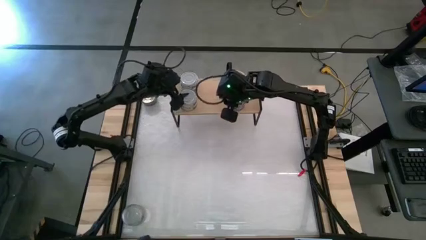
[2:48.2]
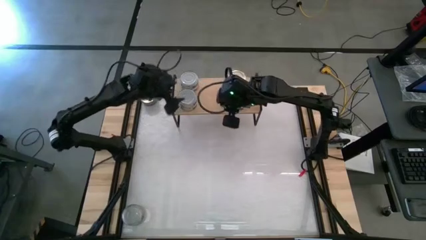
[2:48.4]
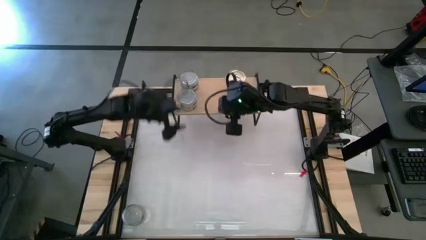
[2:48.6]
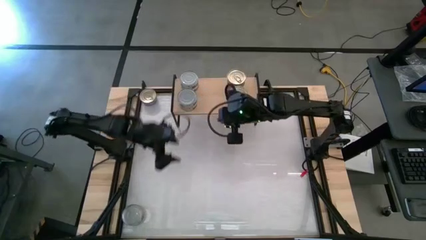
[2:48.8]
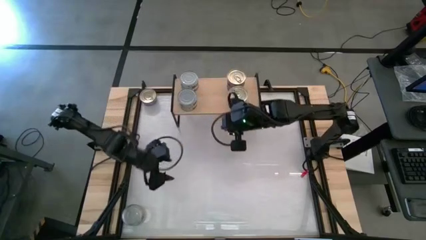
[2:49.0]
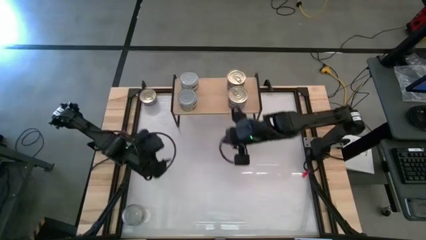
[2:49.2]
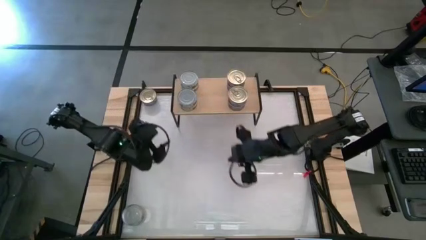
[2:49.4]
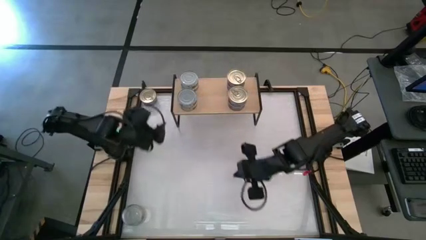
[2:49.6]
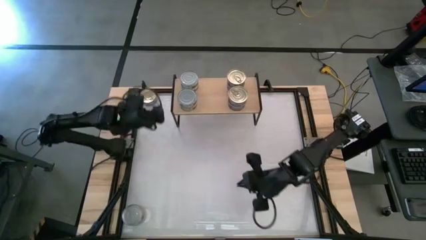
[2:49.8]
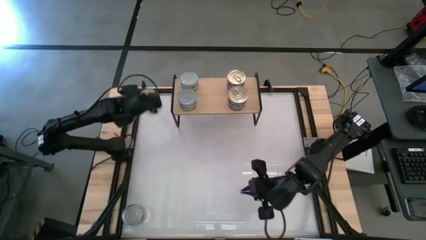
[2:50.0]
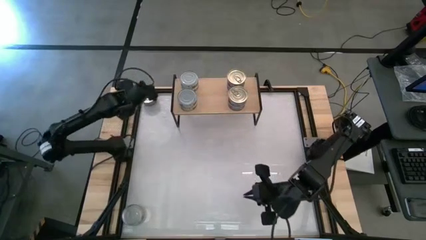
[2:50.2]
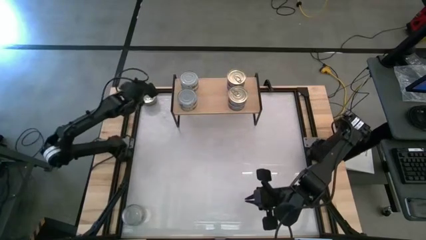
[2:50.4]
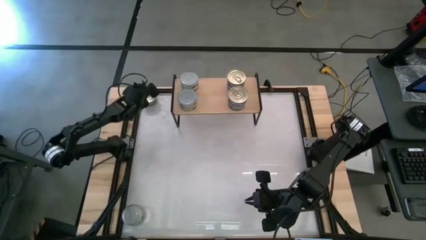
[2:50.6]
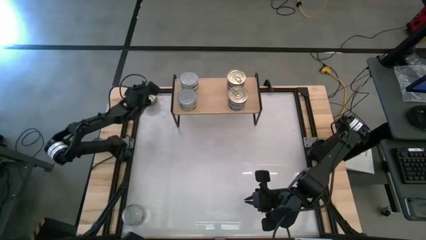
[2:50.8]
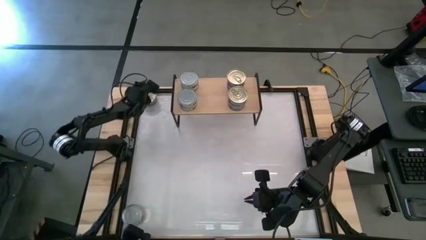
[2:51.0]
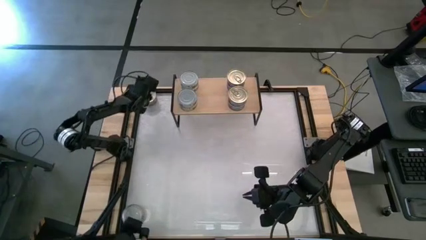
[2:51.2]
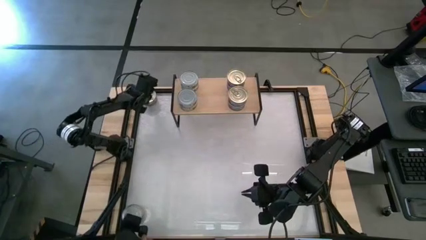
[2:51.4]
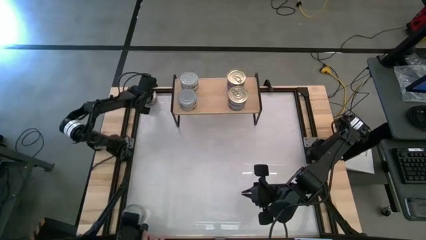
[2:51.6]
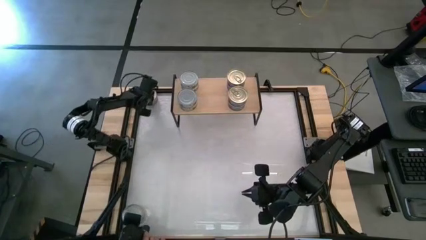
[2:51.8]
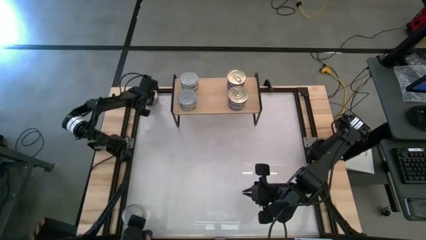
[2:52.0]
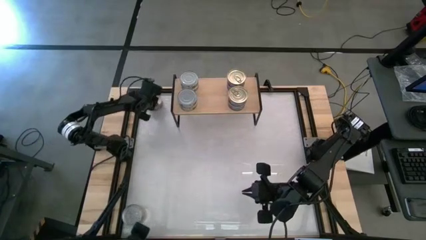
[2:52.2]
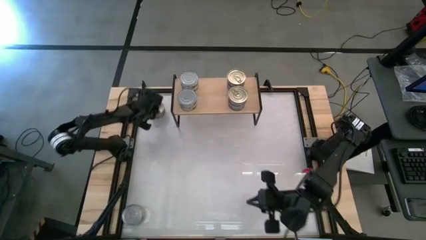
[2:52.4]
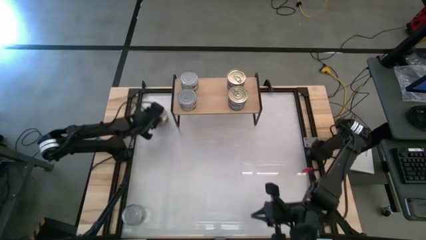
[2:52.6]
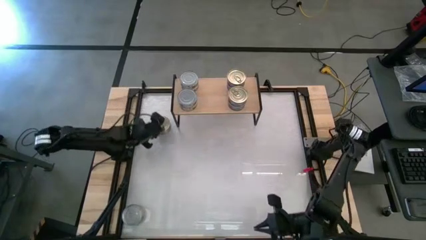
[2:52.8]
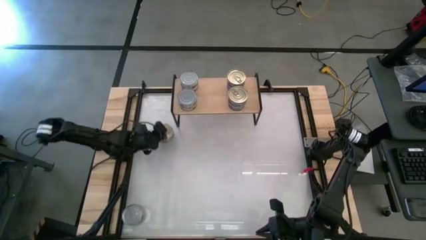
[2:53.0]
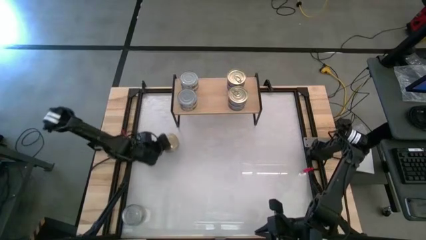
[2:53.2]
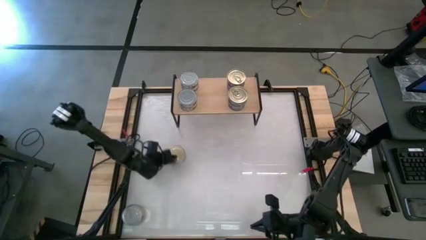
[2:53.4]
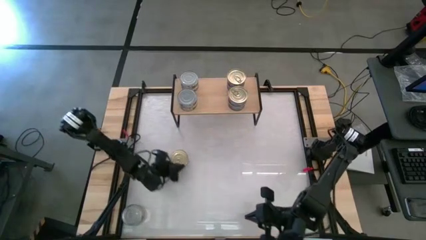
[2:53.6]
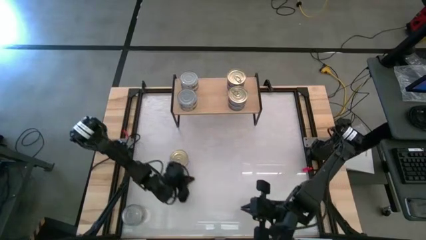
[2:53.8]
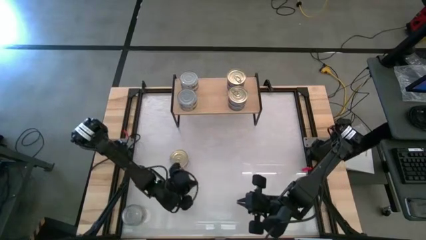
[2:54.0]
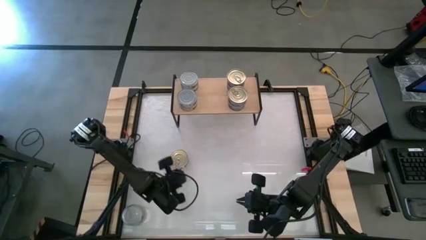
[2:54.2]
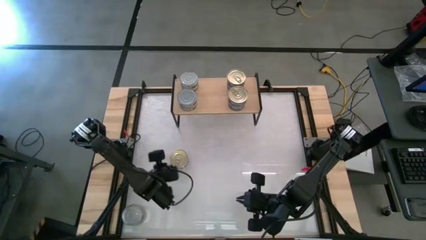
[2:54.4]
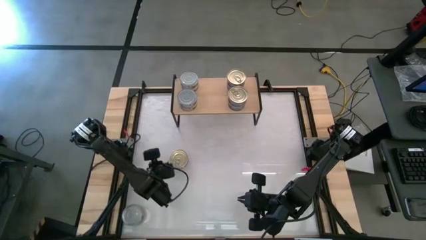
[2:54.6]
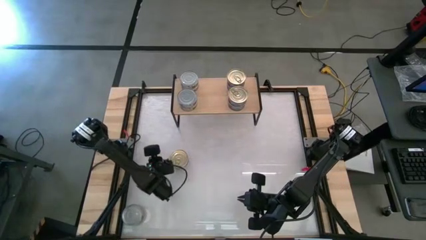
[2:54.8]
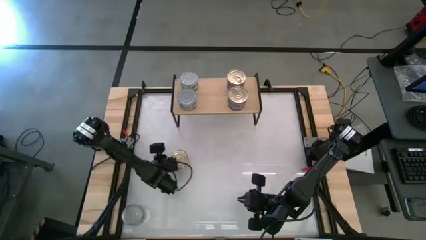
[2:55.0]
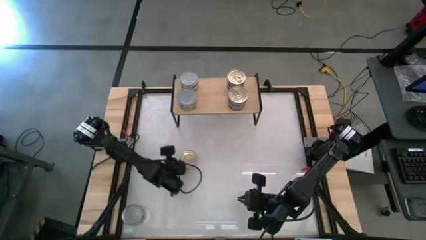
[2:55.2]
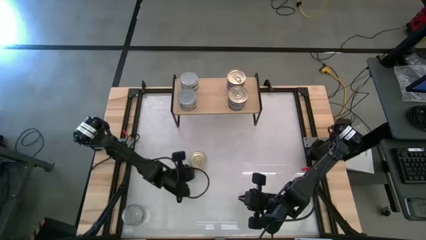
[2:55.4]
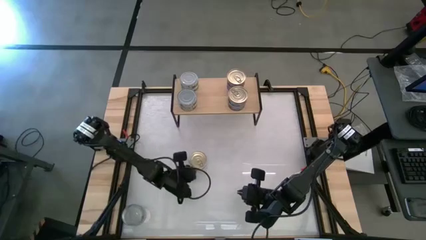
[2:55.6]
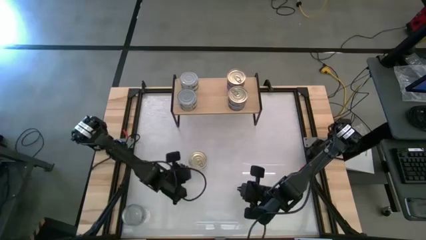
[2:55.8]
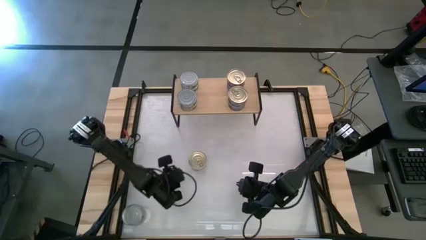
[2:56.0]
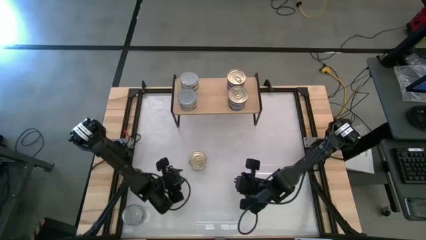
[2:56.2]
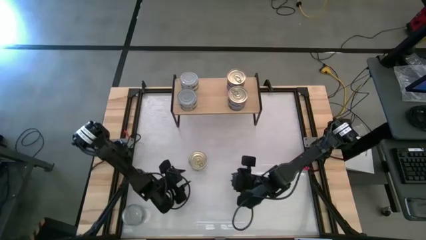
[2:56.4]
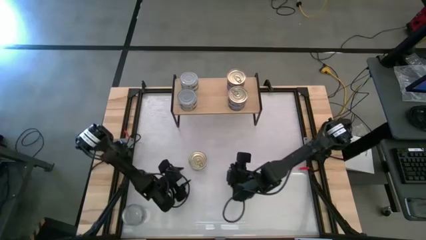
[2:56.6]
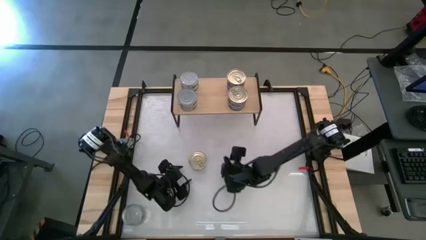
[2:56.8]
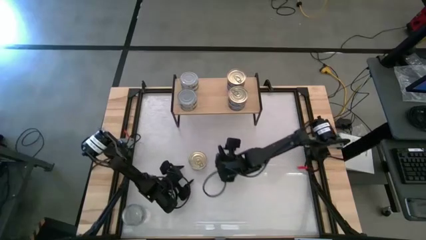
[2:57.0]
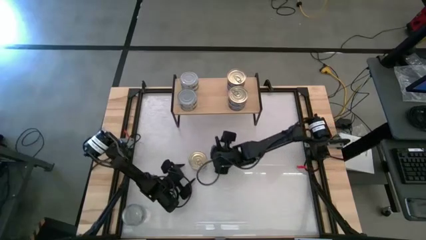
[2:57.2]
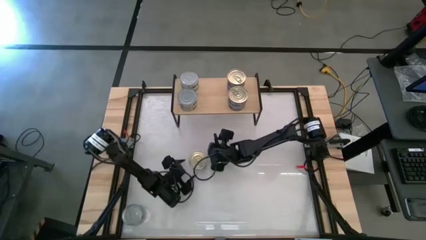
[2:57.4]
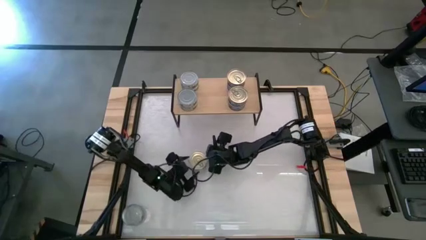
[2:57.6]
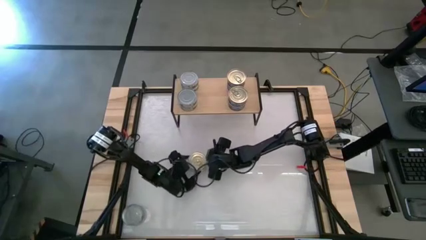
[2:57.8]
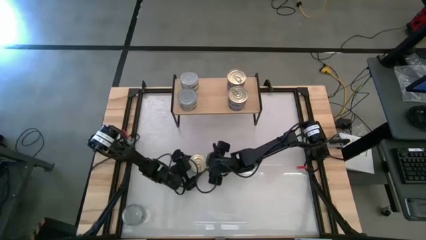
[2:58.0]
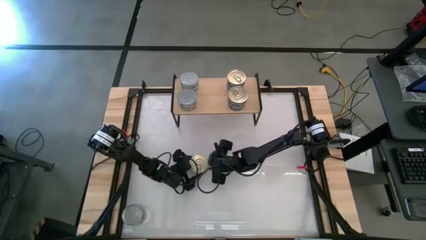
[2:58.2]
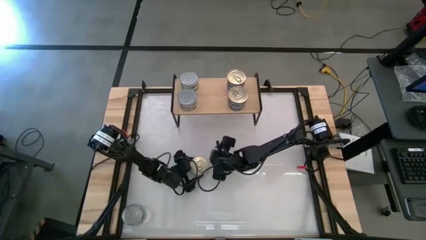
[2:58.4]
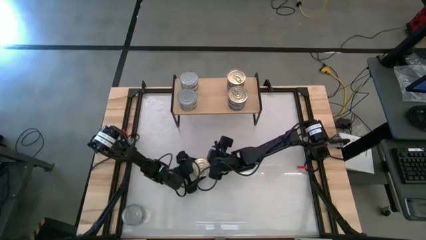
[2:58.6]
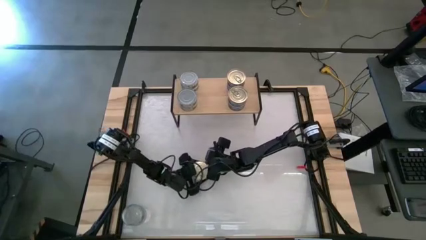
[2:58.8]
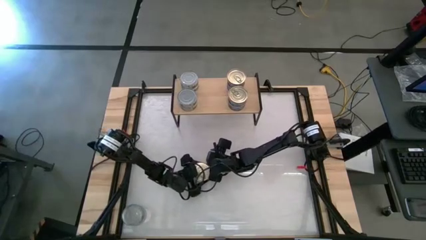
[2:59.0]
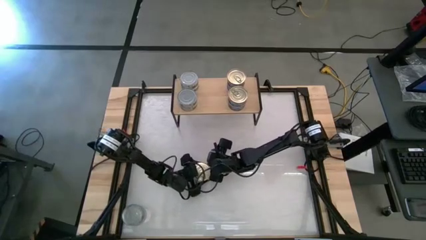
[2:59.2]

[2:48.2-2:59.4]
Task: Stack canned seafood by type on shelf
Stack the blue tuna can on top of the blue tuna can on the shelf
